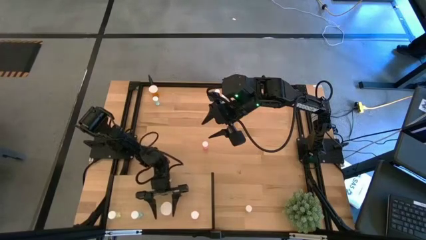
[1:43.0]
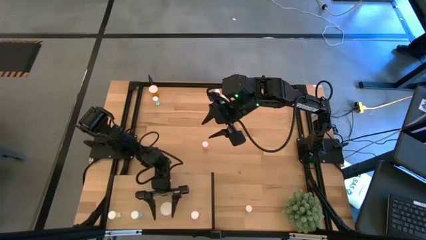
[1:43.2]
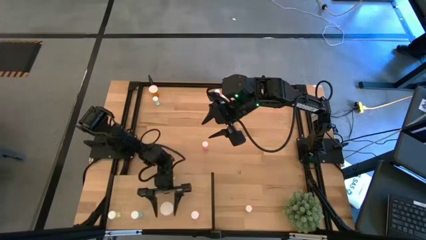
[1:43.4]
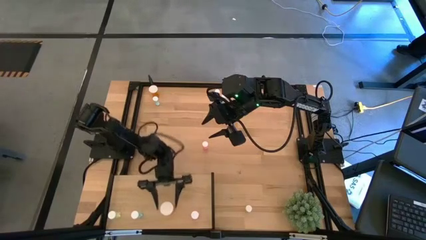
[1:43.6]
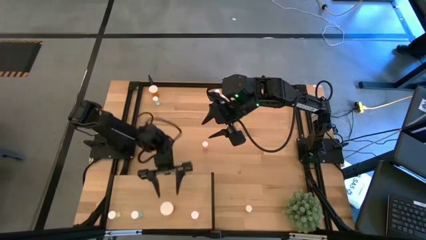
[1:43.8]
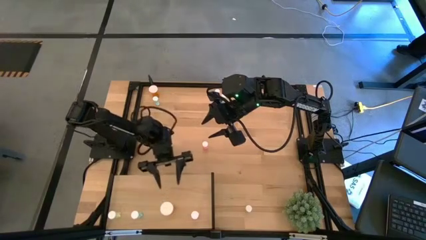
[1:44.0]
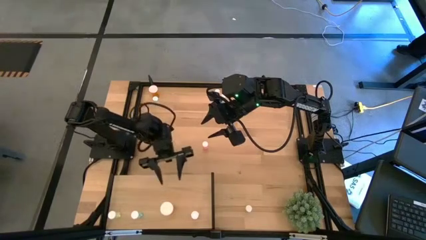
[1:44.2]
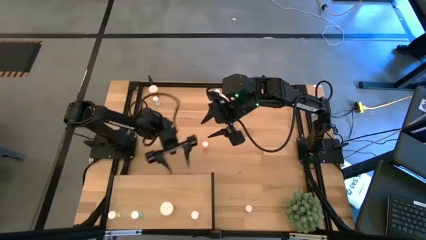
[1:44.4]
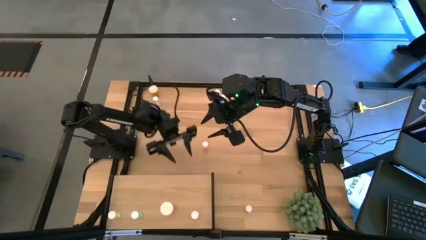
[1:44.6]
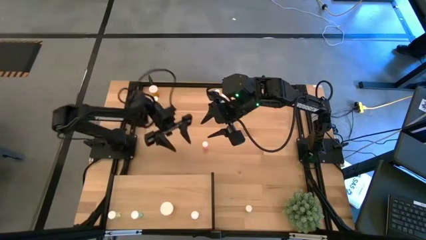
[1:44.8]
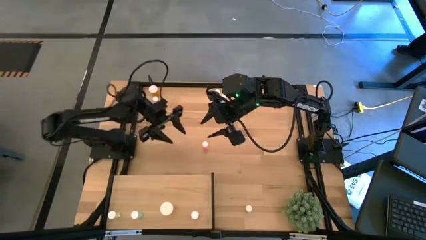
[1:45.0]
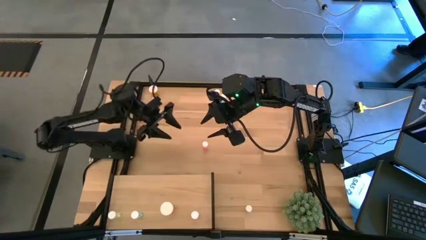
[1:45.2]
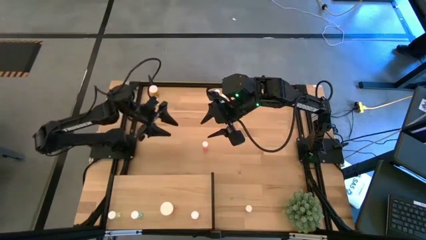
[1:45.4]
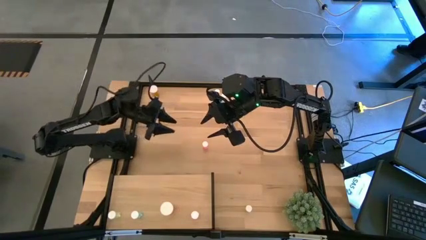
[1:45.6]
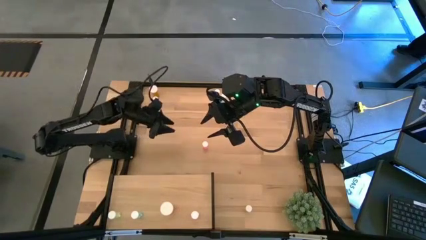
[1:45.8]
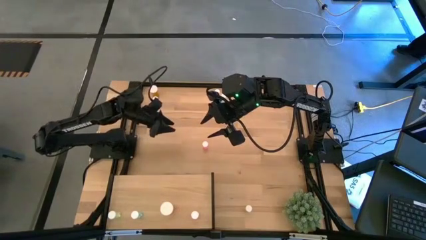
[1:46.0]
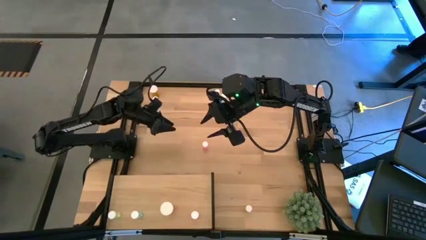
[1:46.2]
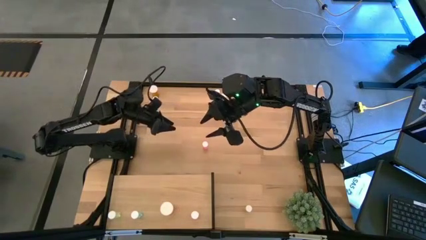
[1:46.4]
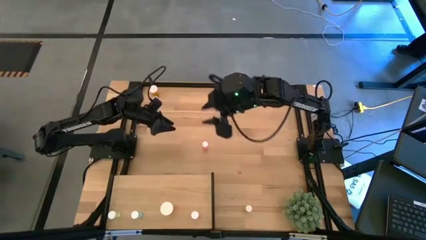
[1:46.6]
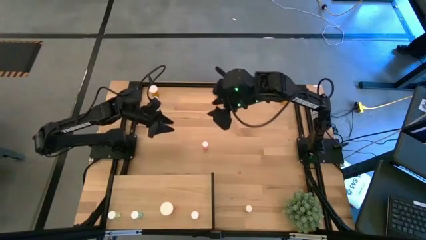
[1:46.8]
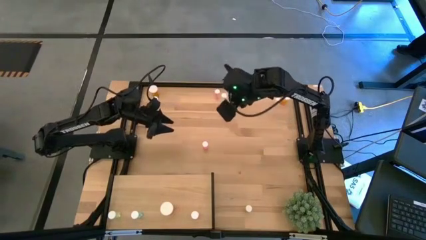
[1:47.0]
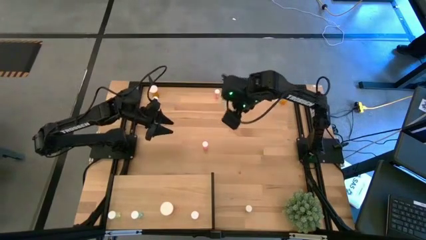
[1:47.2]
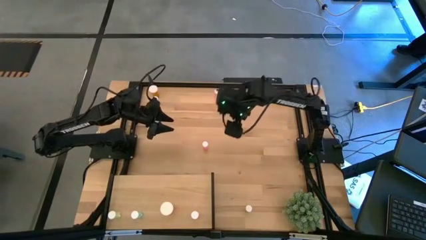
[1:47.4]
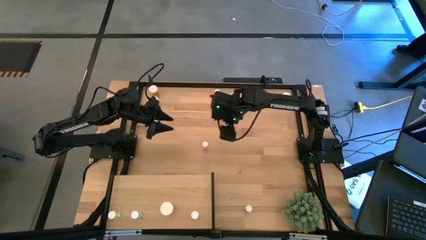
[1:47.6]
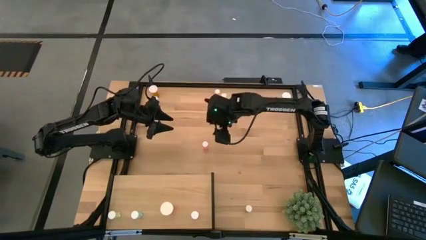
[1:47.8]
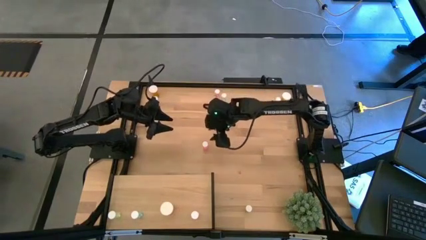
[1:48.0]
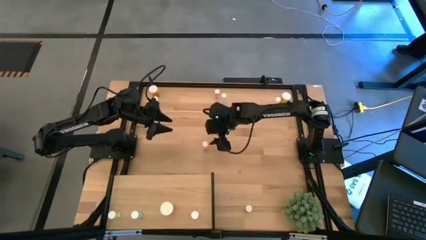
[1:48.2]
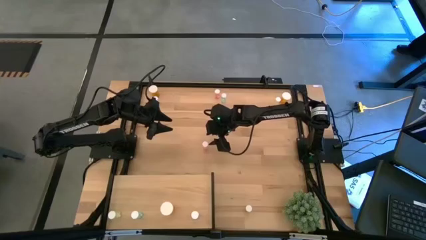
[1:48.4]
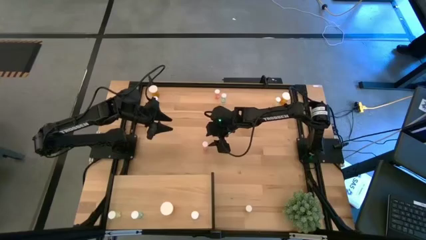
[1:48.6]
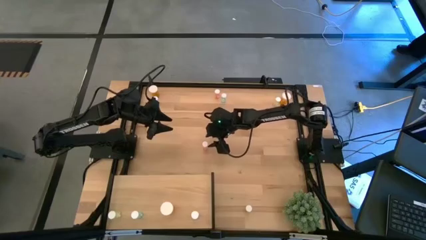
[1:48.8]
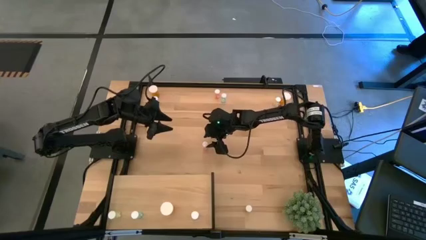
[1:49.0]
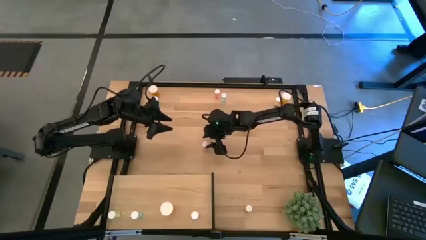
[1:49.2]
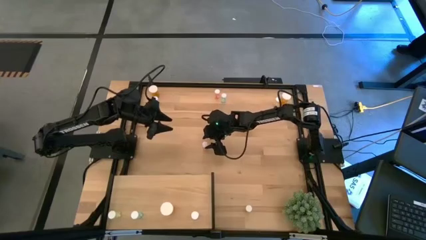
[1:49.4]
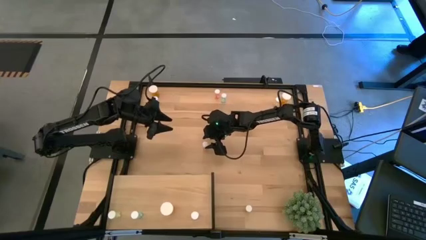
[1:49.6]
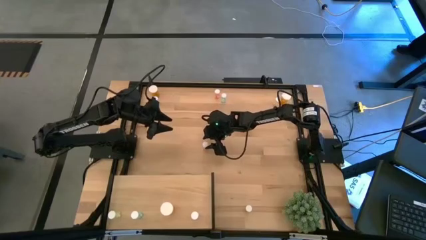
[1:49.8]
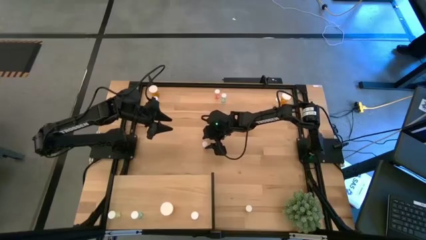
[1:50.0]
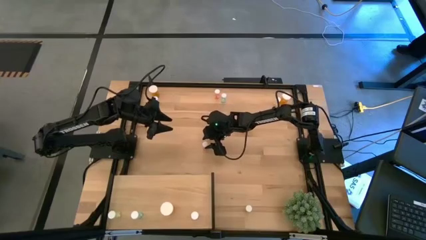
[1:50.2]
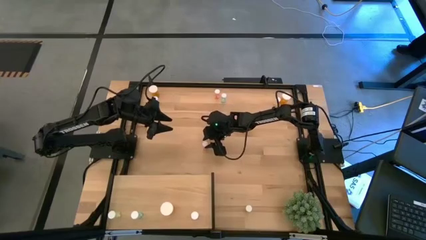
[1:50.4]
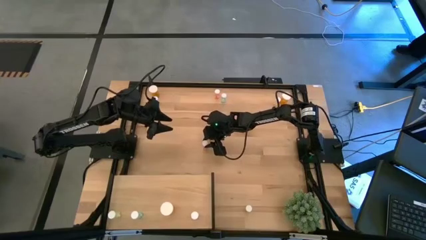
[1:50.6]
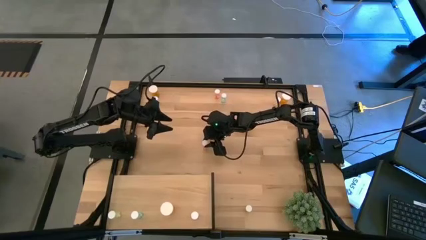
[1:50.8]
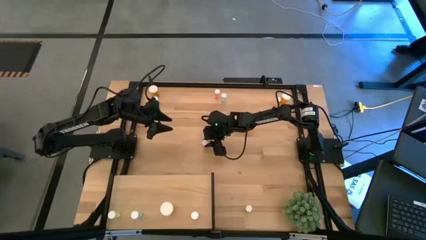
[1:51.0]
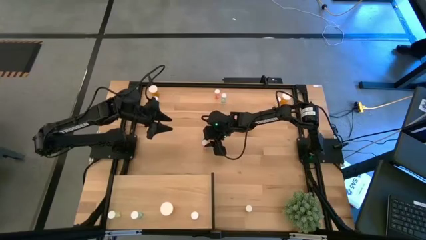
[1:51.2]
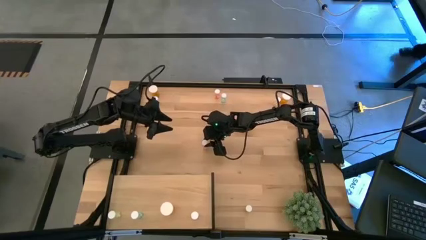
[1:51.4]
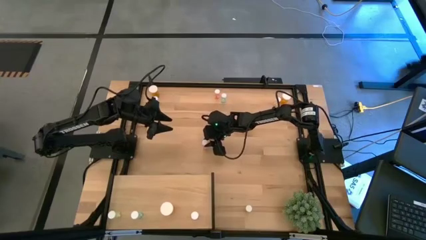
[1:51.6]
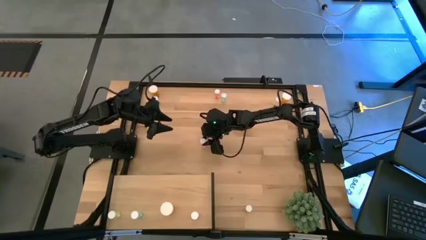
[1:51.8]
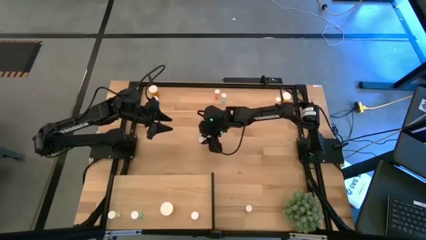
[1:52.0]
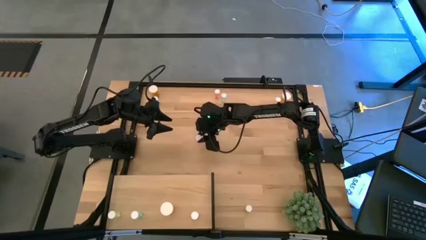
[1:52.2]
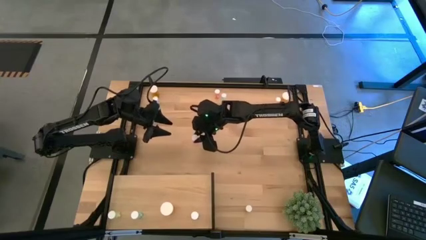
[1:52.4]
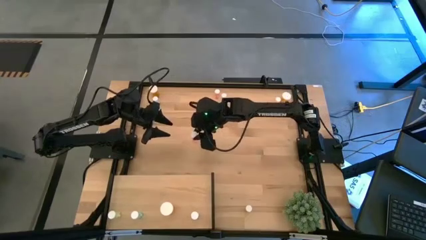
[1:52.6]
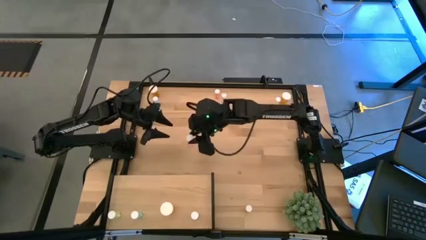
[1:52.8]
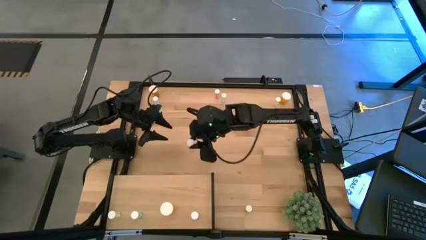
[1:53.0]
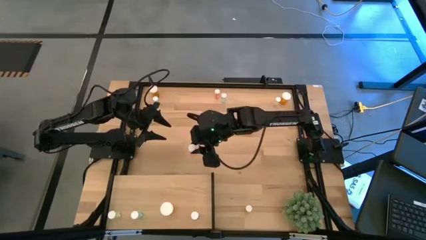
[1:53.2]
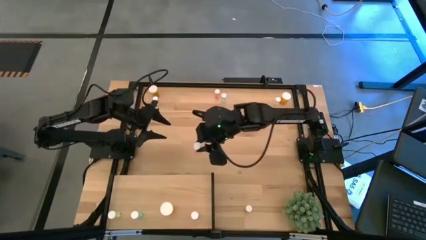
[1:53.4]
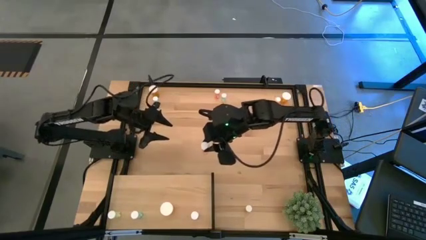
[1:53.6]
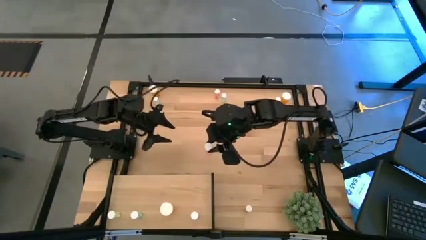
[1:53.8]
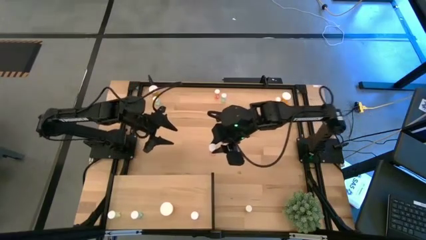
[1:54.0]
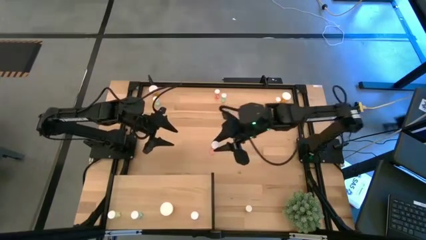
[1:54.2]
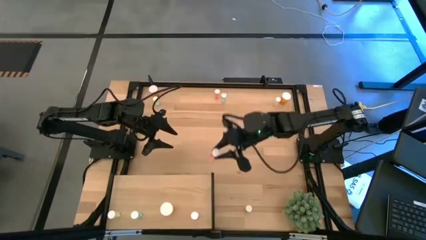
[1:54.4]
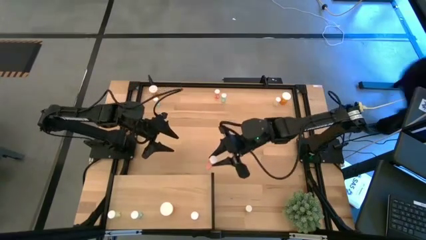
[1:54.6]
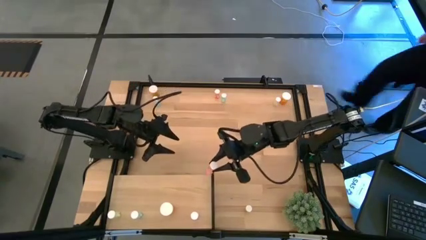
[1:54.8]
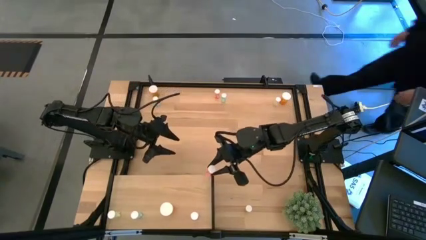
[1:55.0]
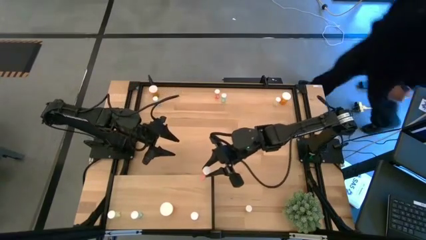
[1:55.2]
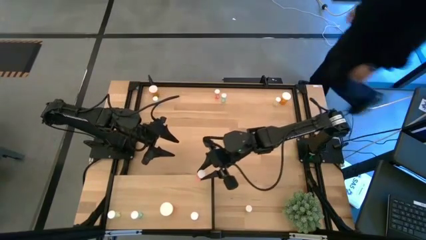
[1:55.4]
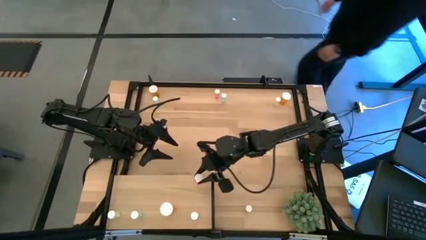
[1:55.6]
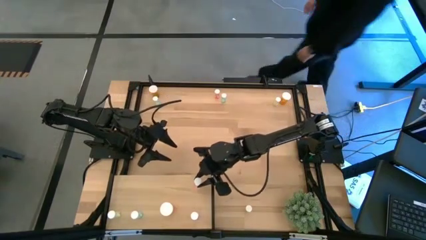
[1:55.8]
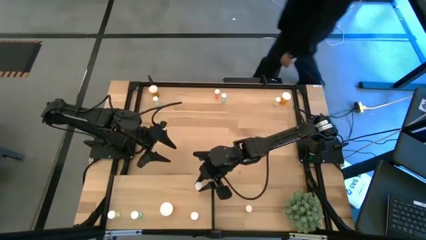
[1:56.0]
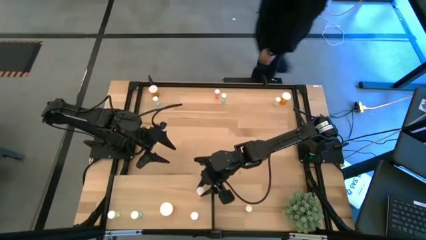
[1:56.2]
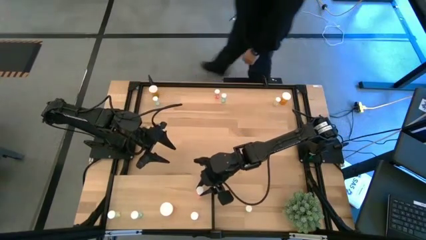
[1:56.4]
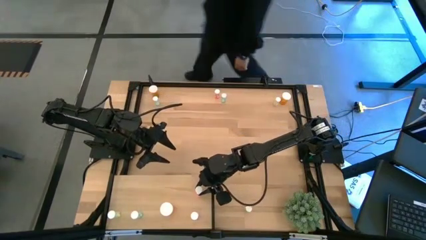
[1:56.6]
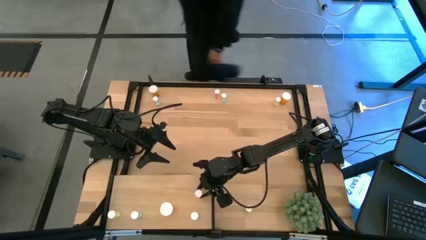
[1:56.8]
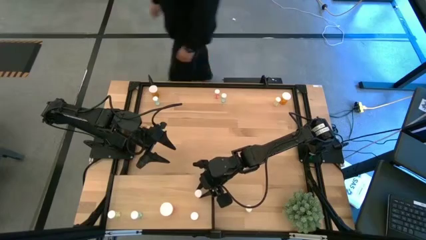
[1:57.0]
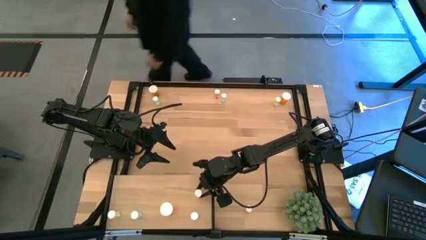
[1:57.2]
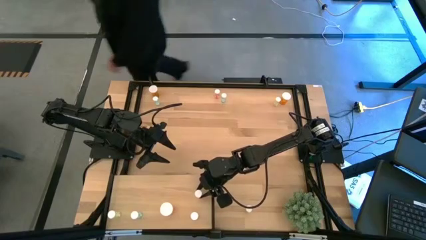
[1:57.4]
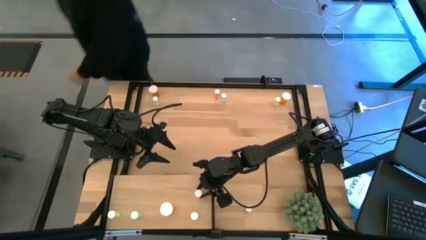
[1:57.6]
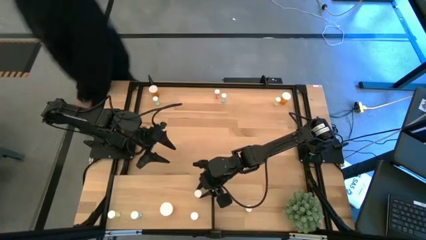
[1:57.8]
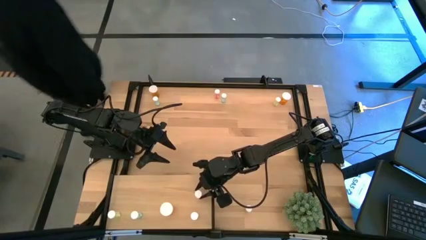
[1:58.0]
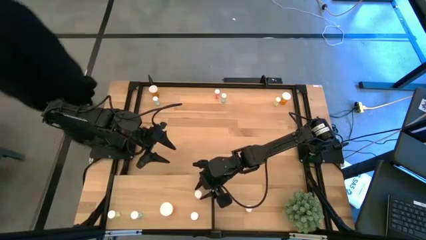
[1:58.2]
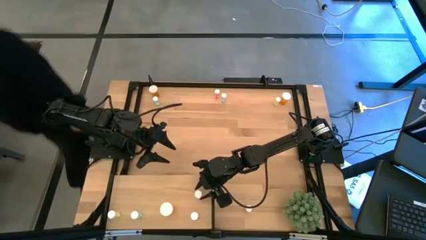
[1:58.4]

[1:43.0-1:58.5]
Task: Pick and place medicine bottles onto shelf by color
Put the bottom middle pink pill bottle on the shelf aligned them with the other pink pill bottle

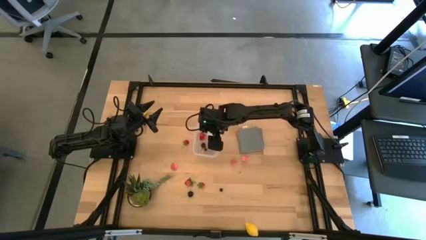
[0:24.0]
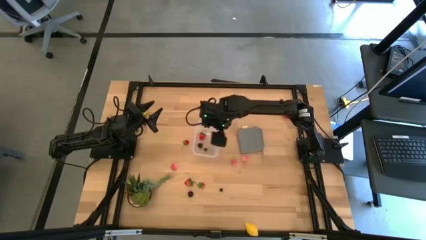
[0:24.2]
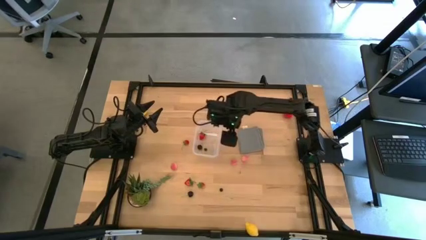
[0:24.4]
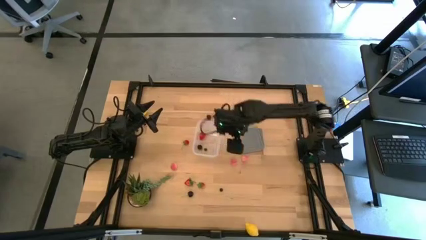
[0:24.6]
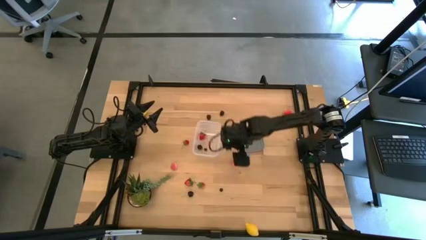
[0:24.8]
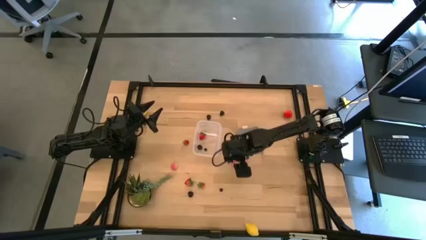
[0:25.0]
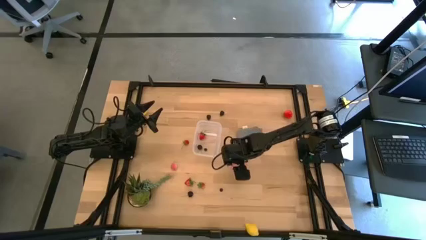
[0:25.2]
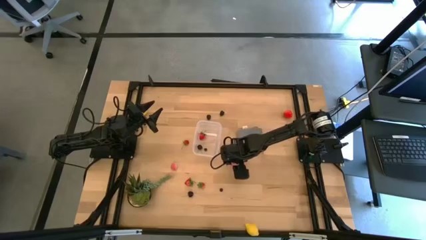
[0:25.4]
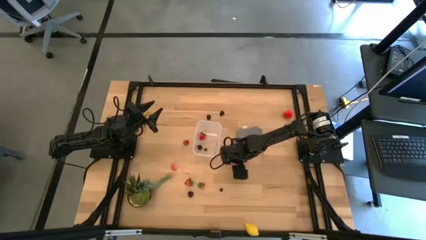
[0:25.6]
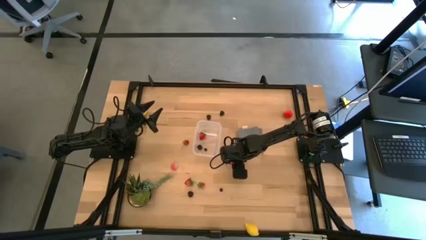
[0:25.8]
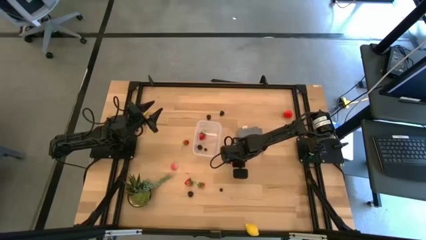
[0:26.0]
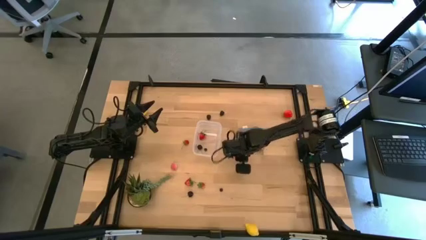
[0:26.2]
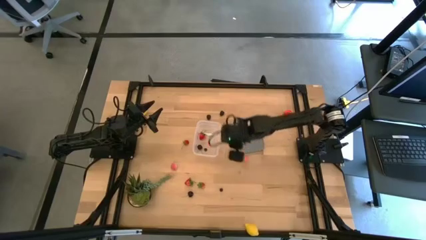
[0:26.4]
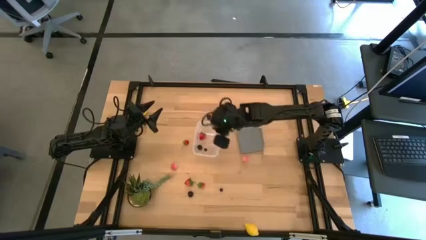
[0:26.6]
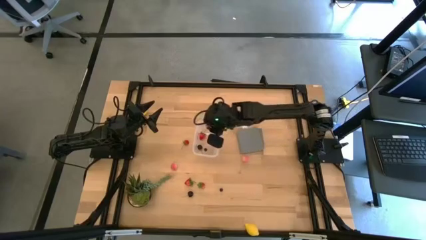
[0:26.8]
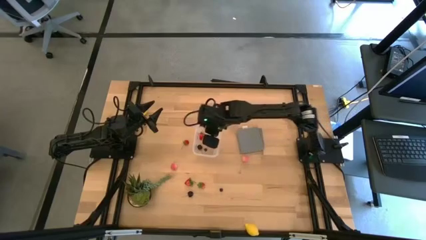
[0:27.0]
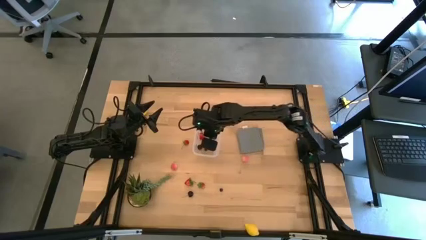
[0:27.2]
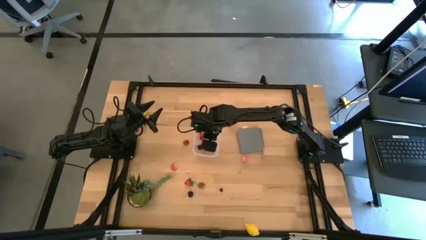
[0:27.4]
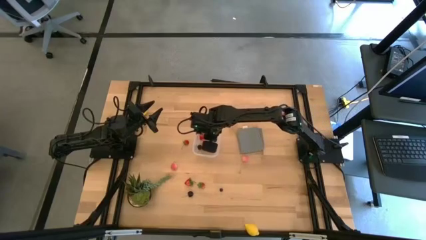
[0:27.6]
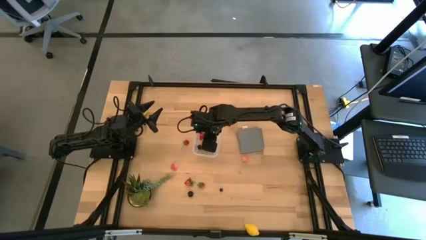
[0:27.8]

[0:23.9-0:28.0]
Task: Pick and placing Produce into tupperware
Put the peach into the transparent bin
